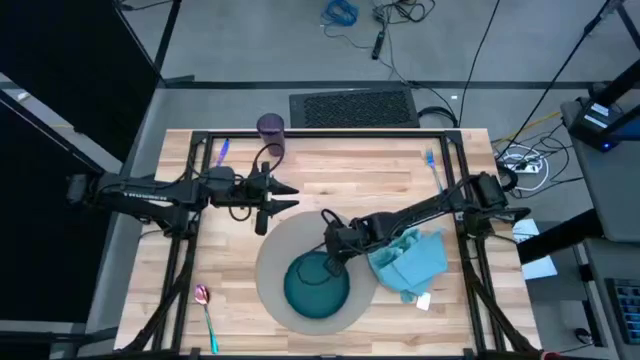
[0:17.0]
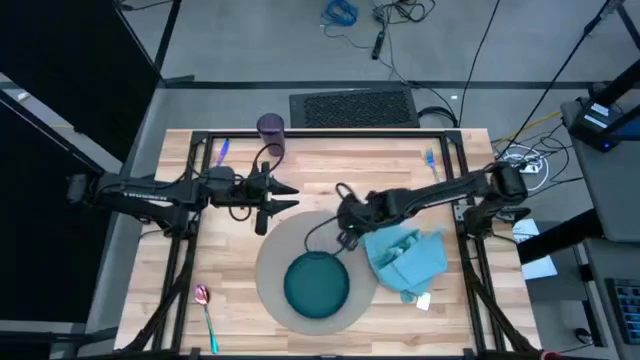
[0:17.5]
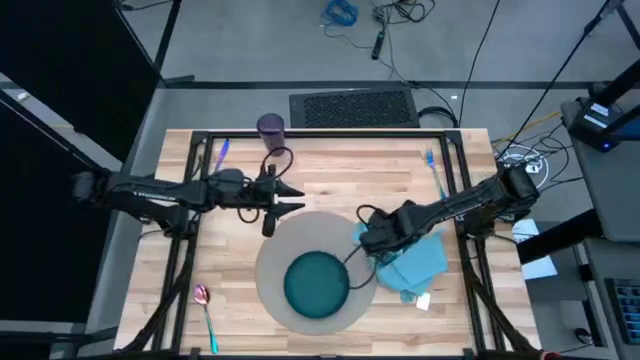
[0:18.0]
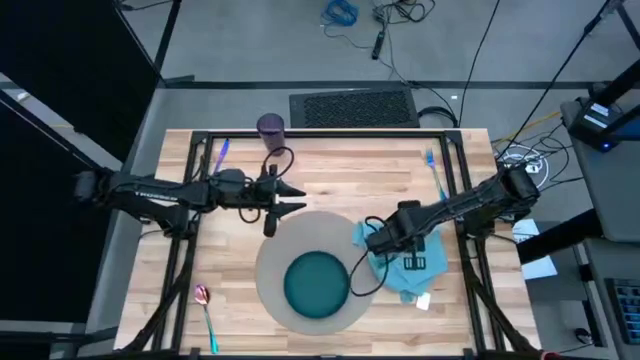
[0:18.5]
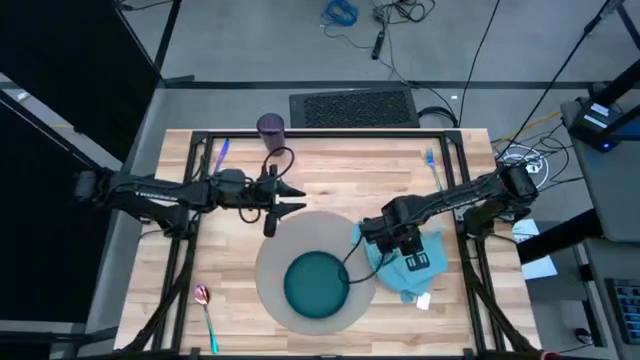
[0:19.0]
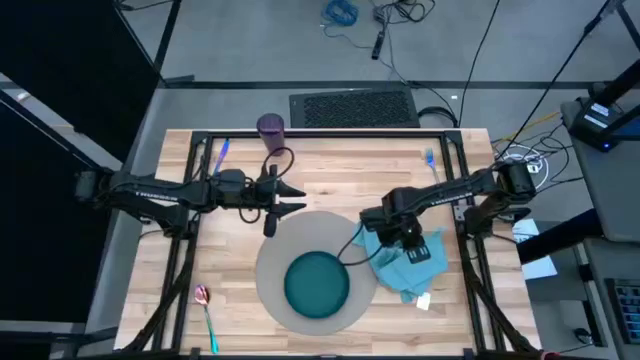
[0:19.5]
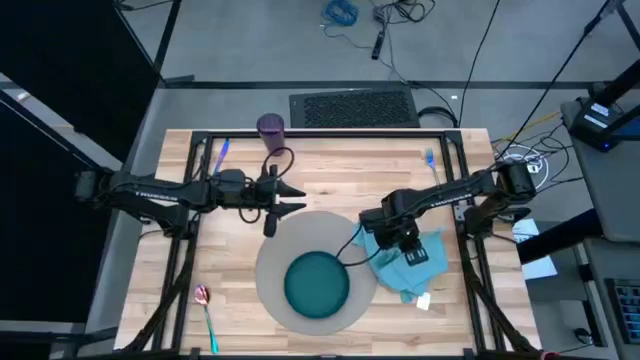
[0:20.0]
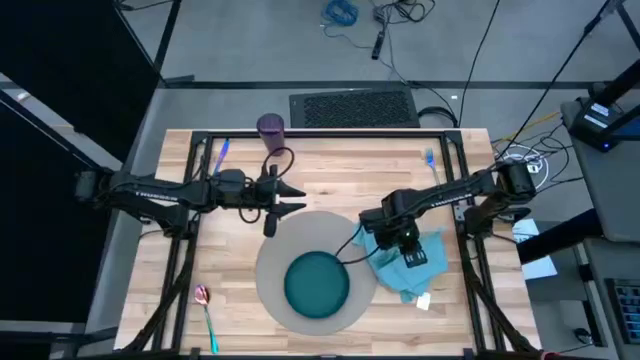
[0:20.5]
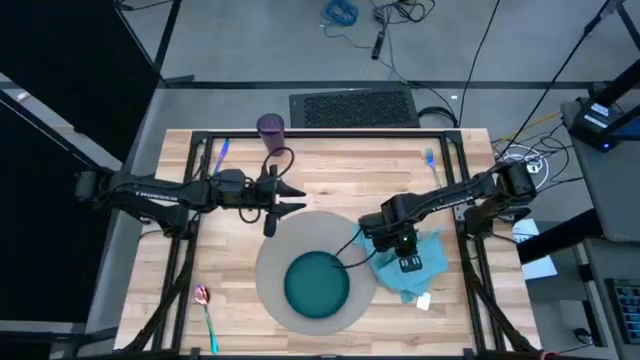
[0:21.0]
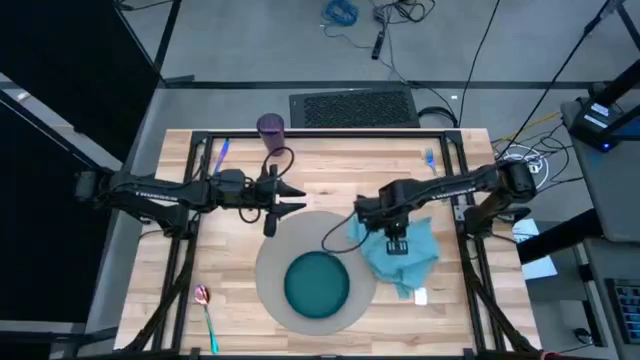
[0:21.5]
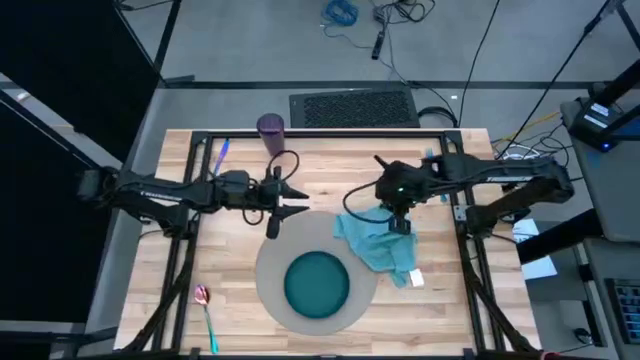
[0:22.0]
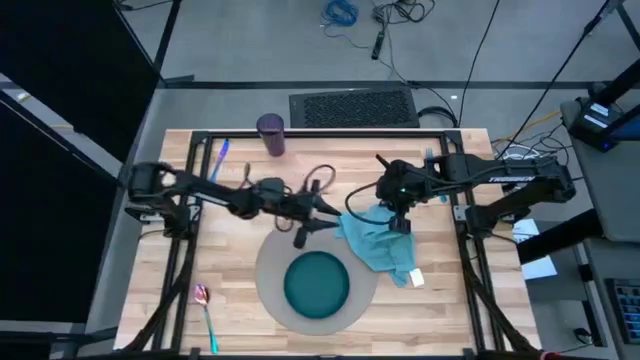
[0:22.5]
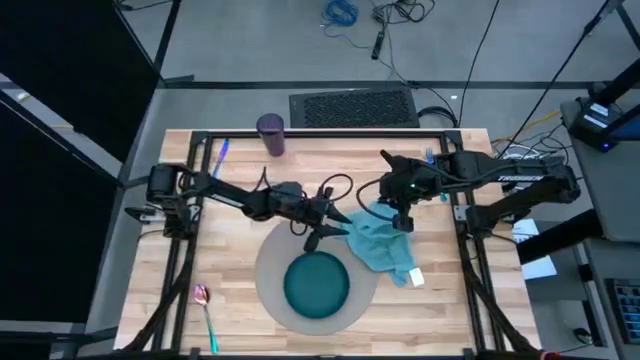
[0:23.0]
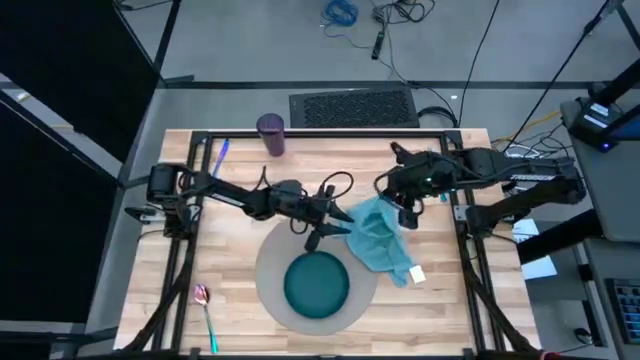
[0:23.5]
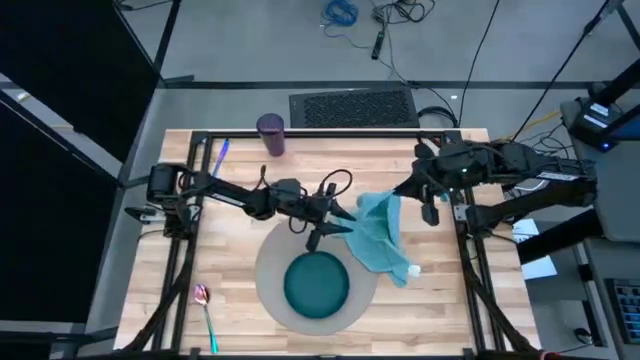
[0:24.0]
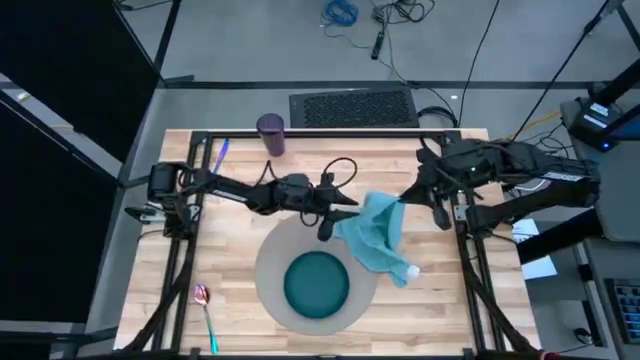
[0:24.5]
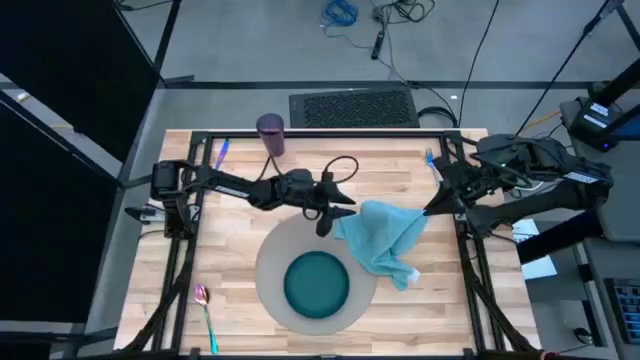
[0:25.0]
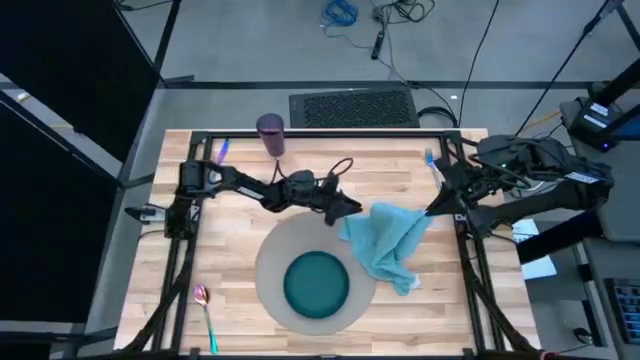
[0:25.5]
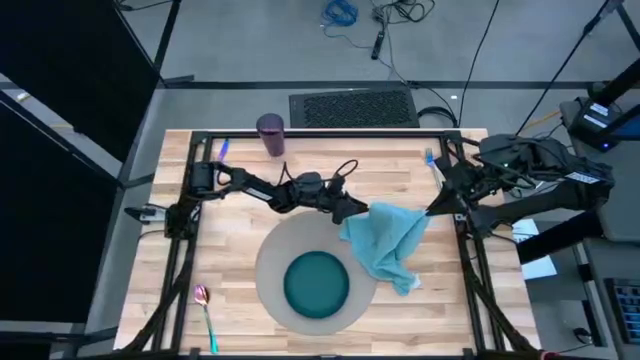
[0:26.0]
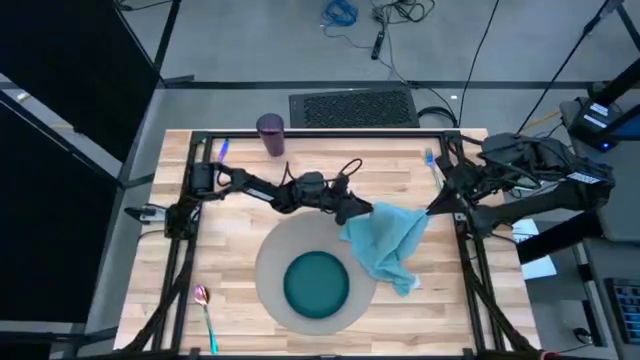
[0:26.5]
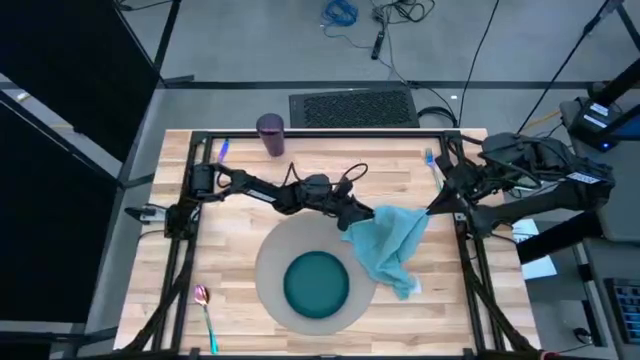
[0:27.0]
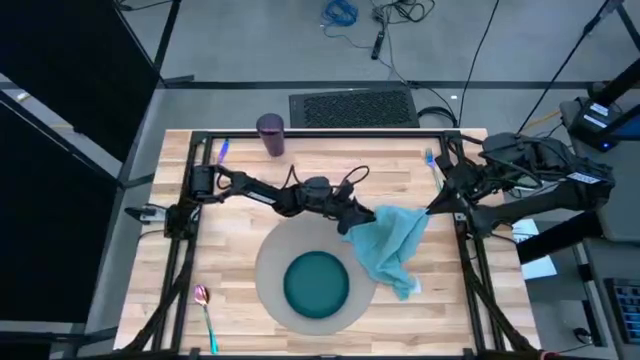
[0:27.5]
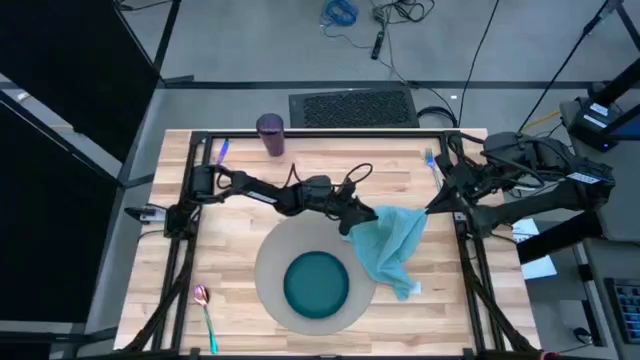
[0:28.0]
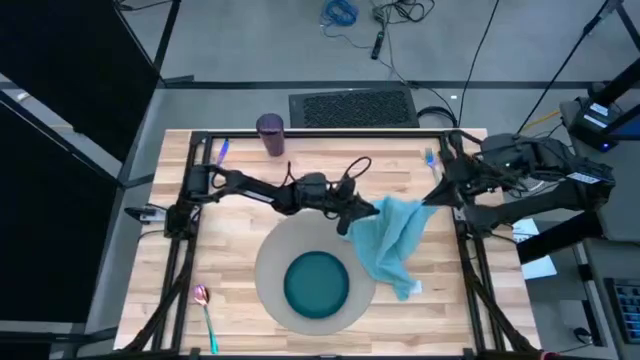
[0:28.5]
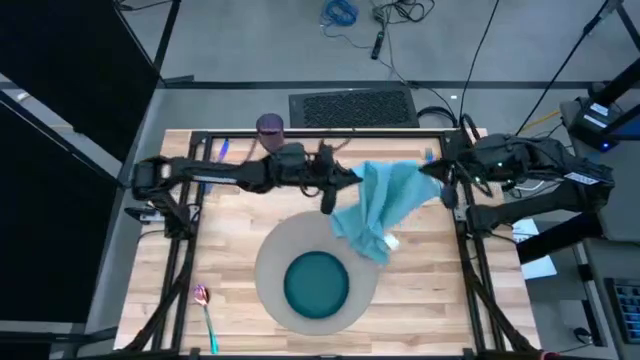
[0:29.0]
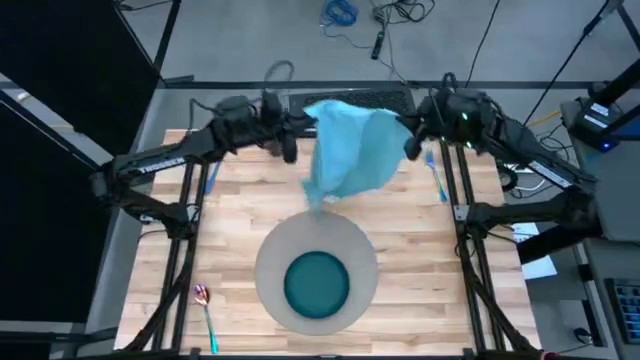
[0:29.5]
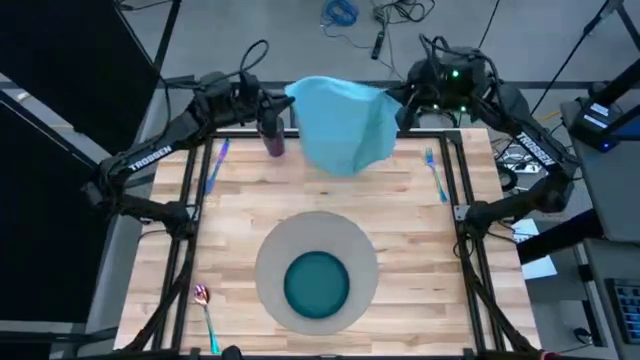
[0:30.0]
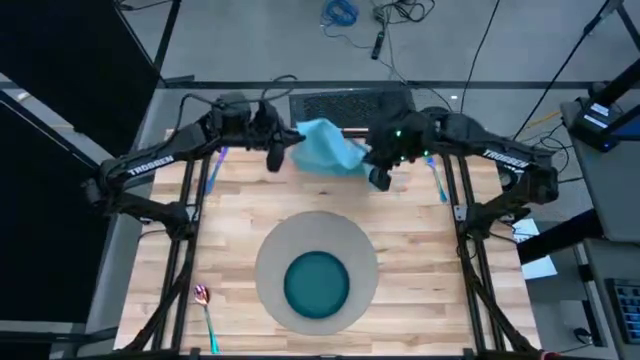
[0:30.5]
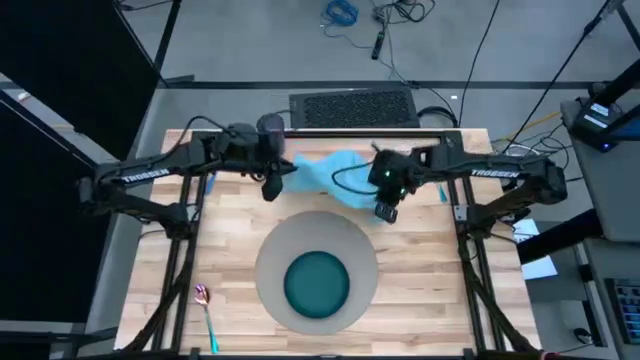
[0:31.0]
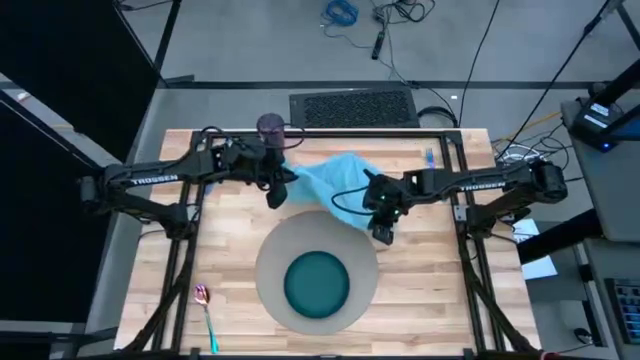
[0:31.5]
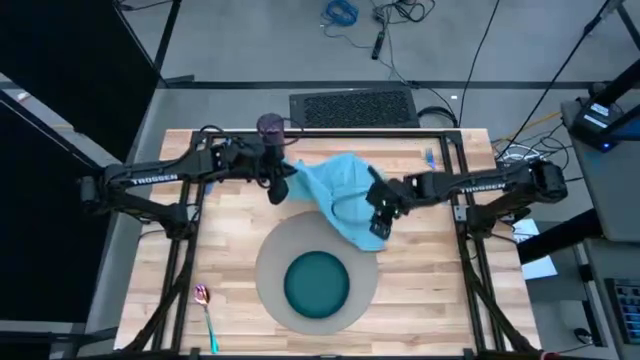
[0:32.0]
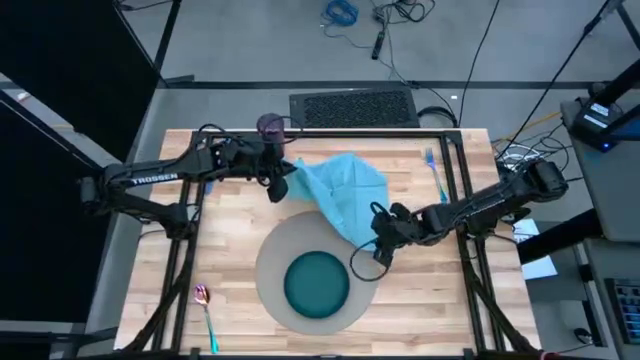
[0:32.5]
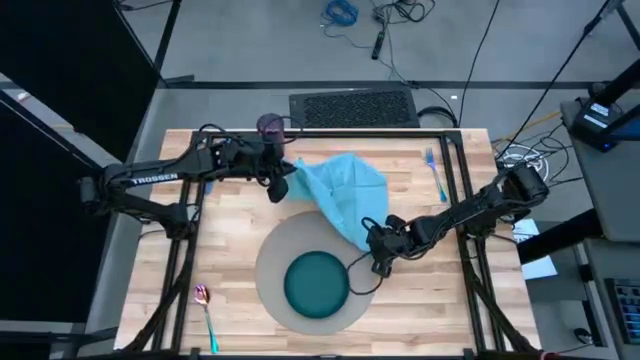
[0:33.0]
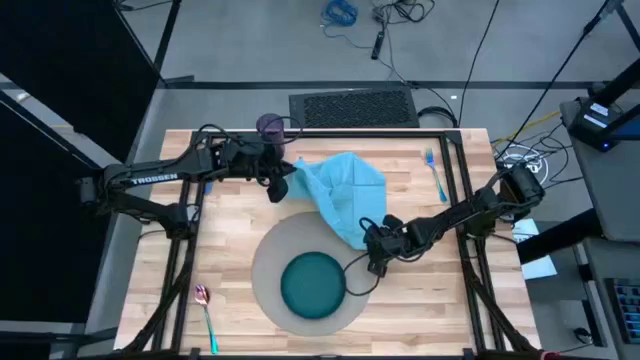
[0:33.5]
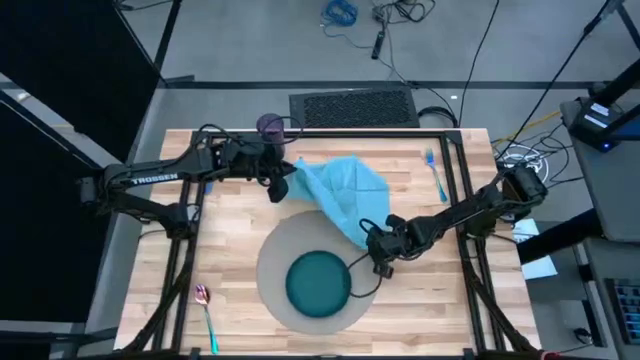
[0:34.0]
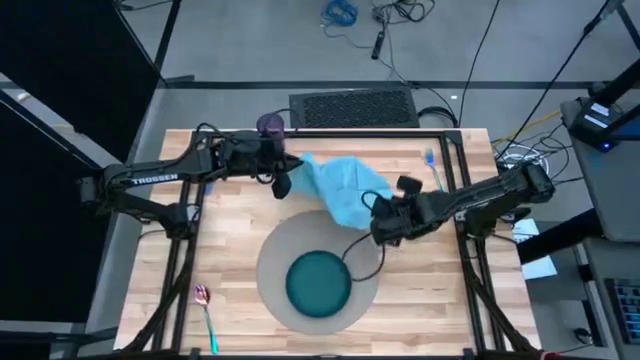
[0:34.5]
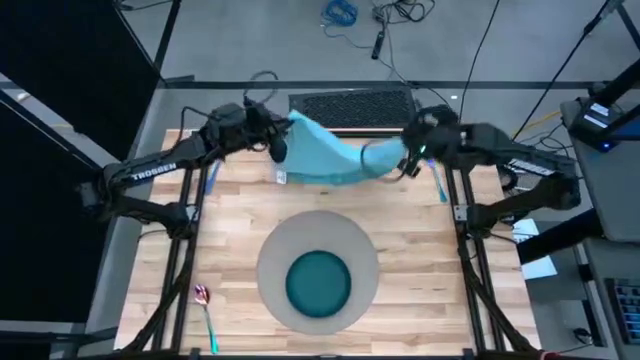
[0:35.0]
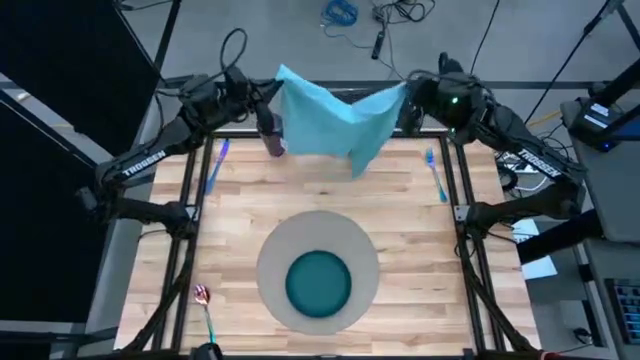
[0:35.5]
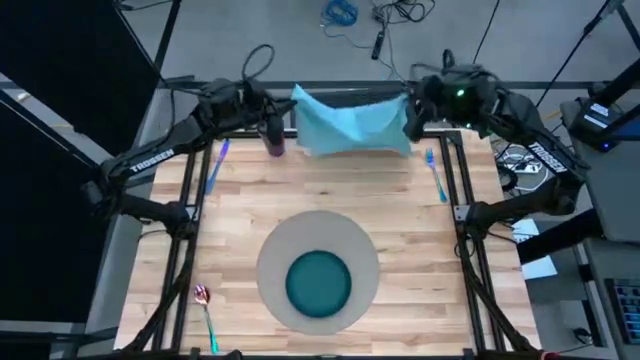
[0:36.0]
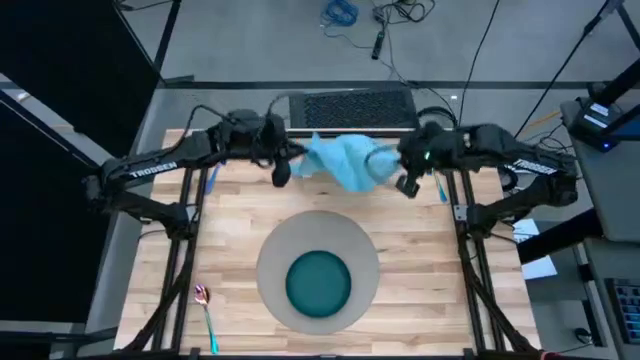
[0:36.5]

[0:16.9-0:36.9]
Task: Set table place
Fold the blue table napkin

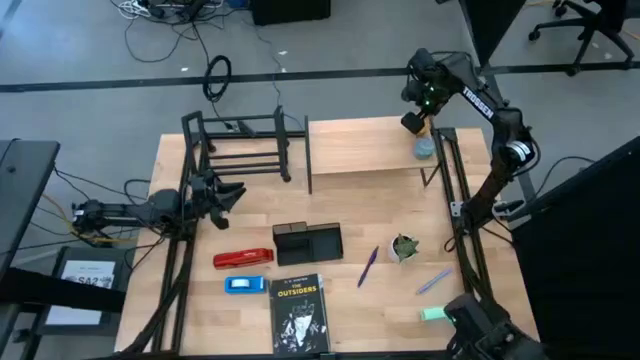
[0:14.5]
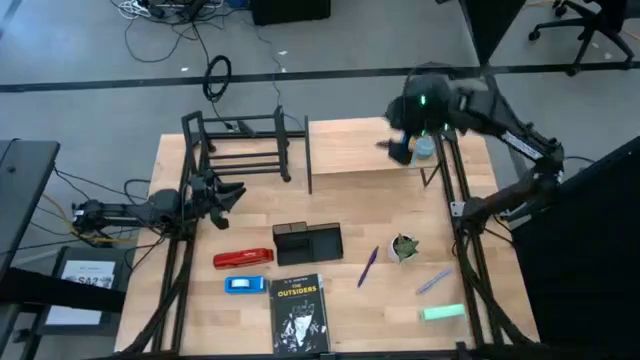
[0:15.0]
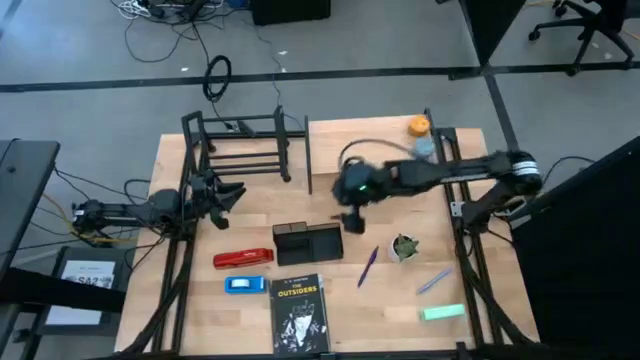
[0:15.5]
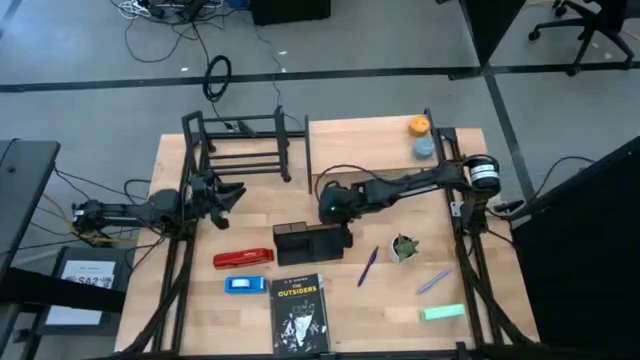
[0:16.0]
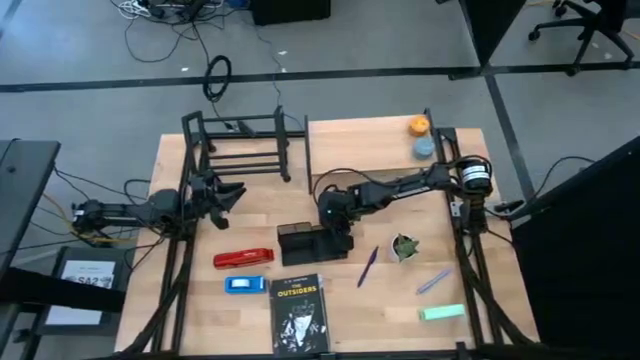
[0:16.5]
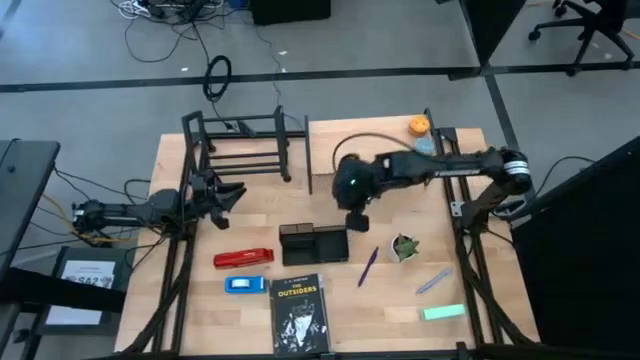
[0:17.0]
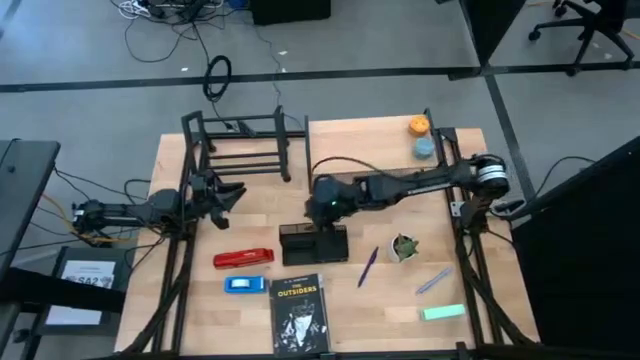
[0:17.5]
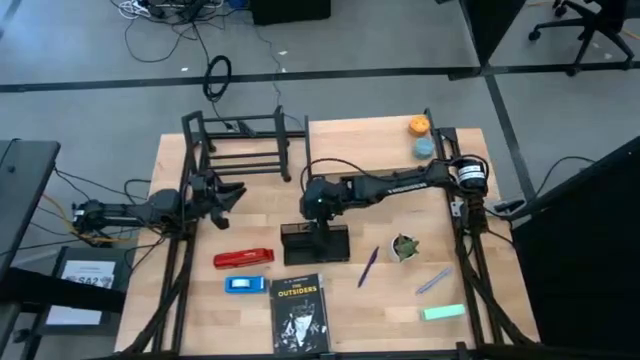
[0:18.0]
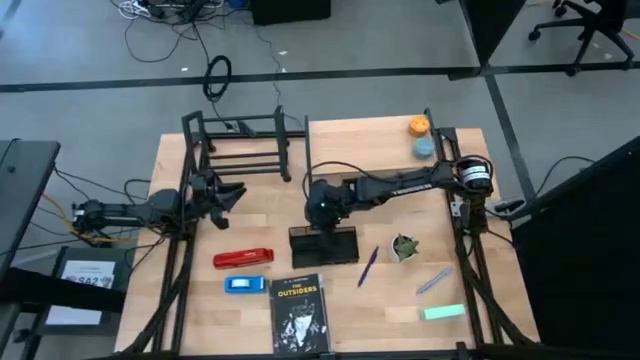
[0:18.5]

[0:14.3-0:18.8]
Task: Stock shelves
Put the black desk organizer on the shelf
